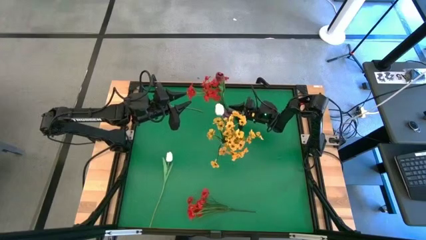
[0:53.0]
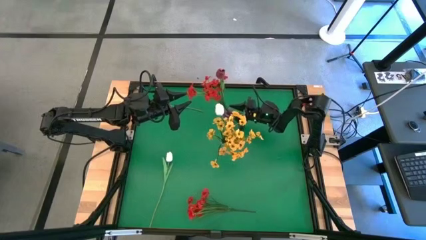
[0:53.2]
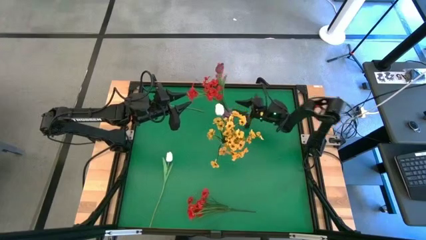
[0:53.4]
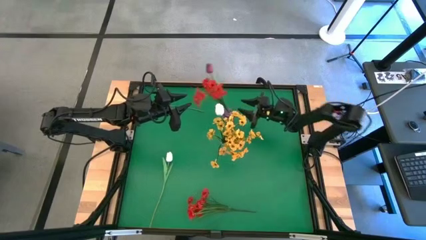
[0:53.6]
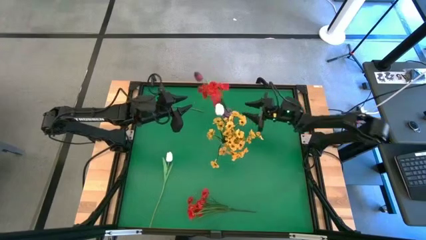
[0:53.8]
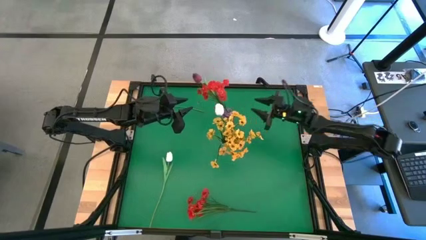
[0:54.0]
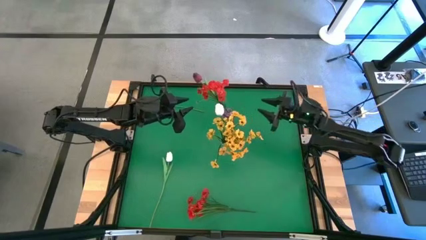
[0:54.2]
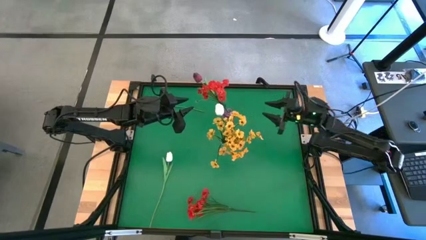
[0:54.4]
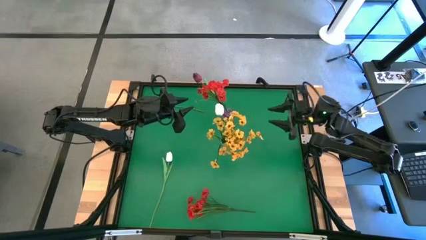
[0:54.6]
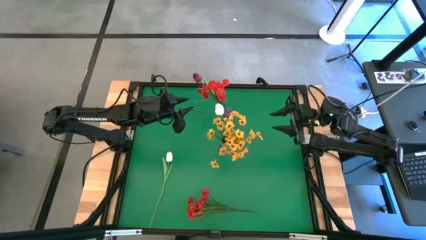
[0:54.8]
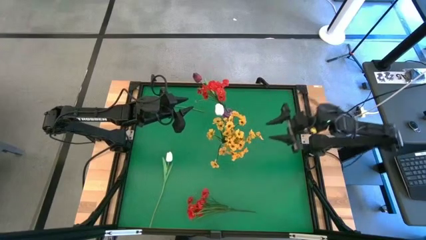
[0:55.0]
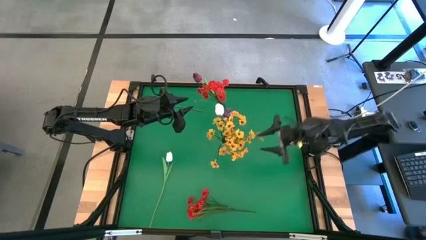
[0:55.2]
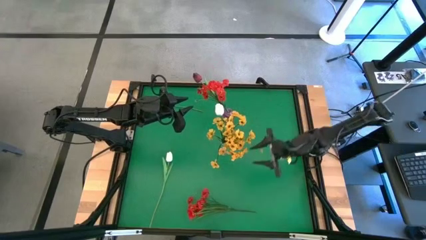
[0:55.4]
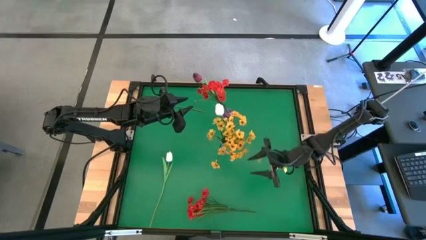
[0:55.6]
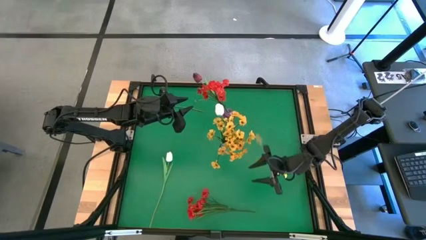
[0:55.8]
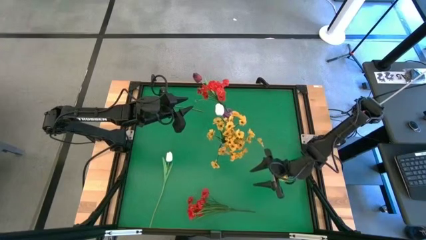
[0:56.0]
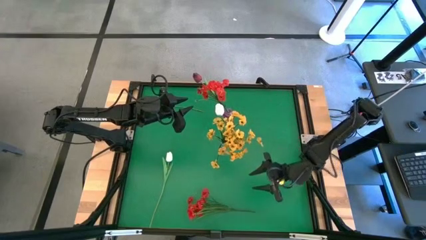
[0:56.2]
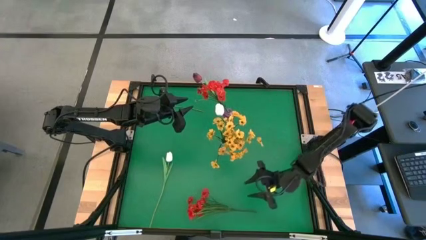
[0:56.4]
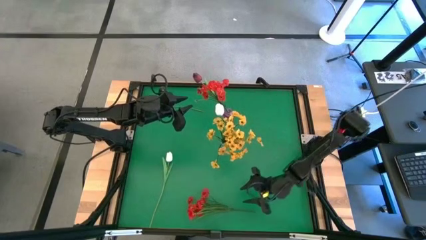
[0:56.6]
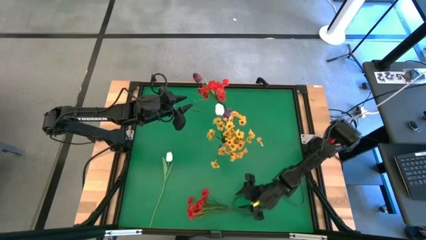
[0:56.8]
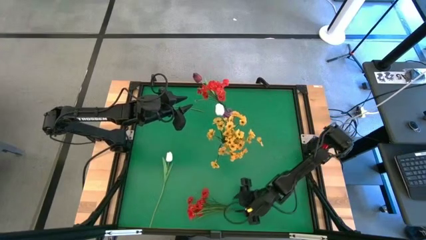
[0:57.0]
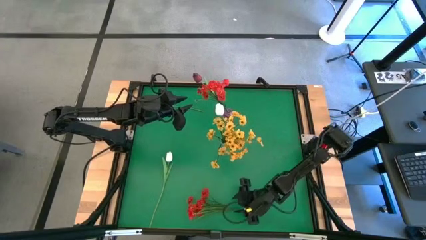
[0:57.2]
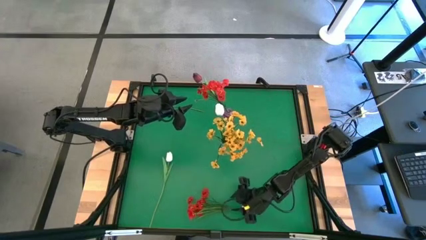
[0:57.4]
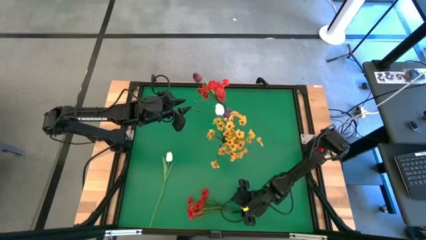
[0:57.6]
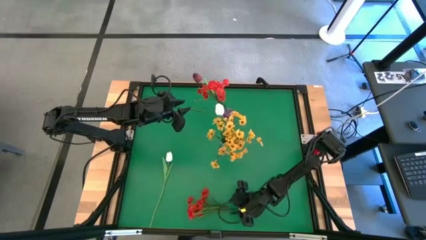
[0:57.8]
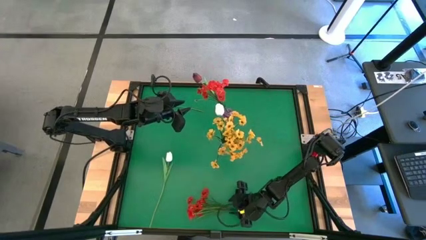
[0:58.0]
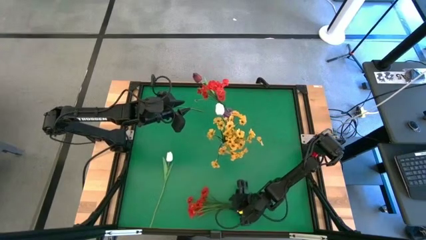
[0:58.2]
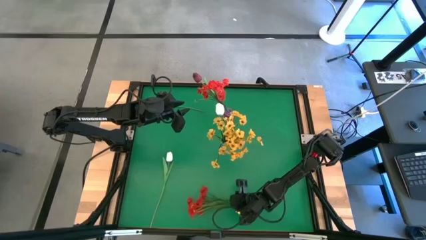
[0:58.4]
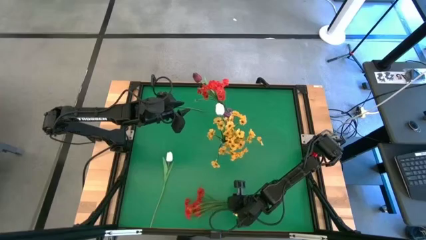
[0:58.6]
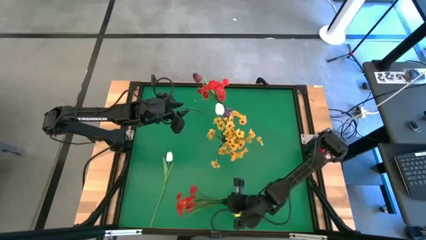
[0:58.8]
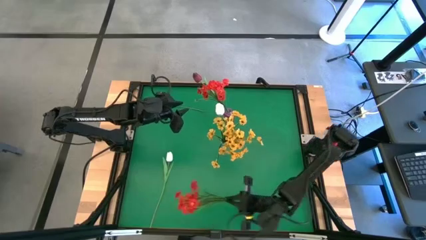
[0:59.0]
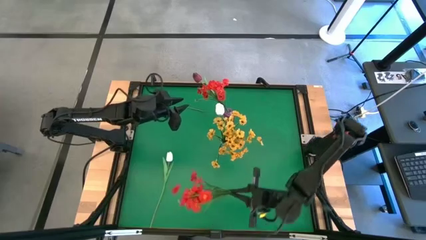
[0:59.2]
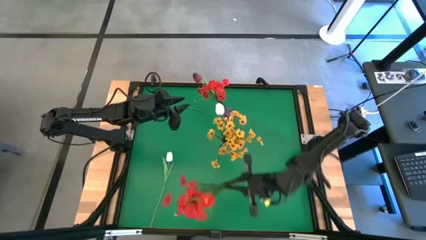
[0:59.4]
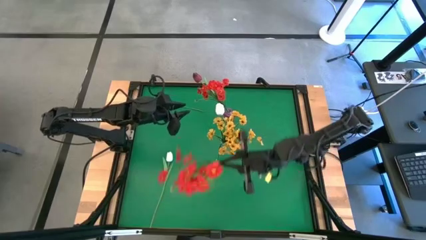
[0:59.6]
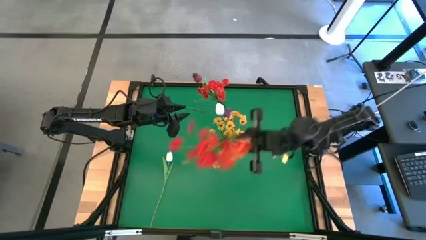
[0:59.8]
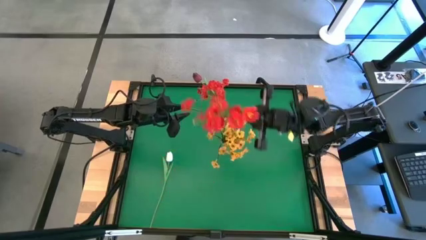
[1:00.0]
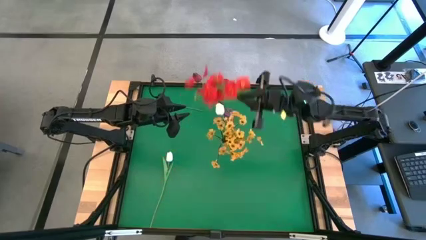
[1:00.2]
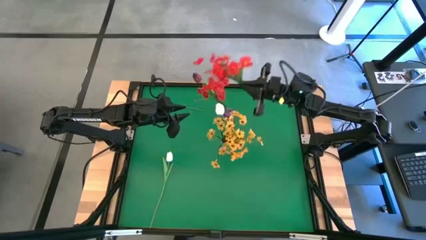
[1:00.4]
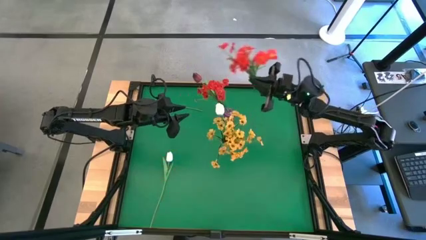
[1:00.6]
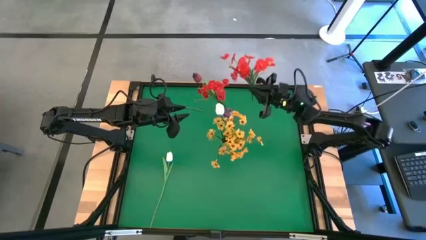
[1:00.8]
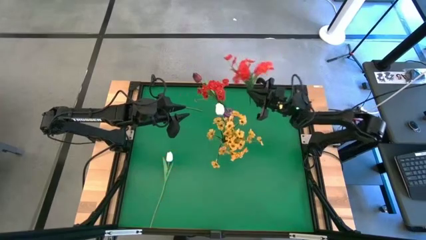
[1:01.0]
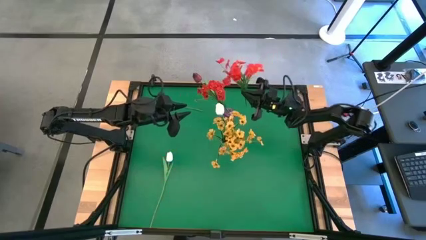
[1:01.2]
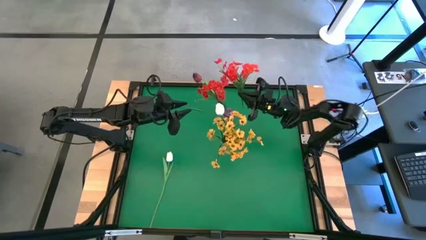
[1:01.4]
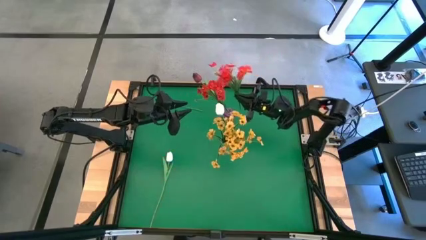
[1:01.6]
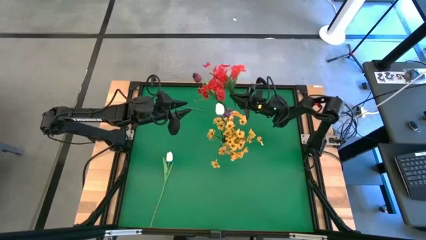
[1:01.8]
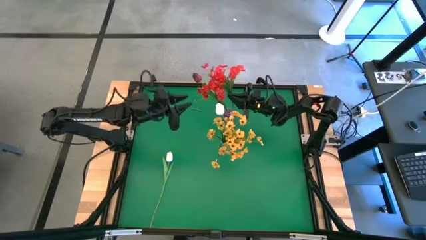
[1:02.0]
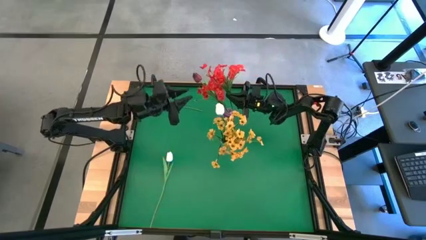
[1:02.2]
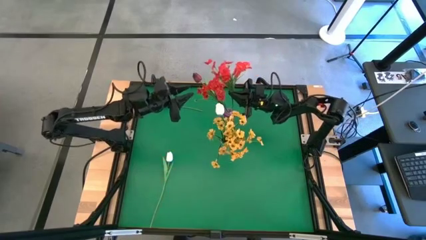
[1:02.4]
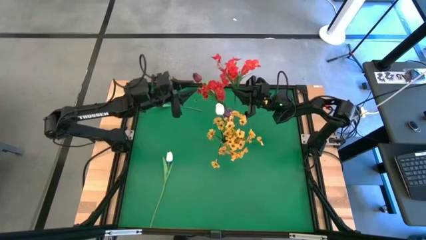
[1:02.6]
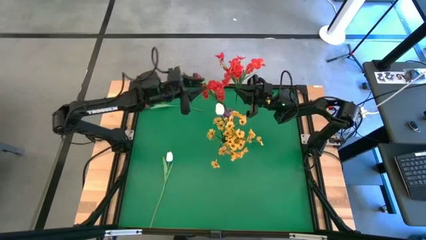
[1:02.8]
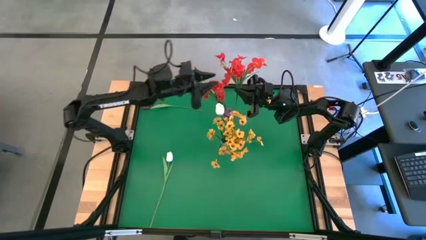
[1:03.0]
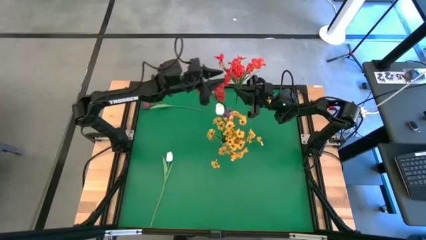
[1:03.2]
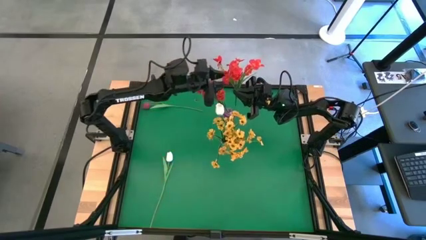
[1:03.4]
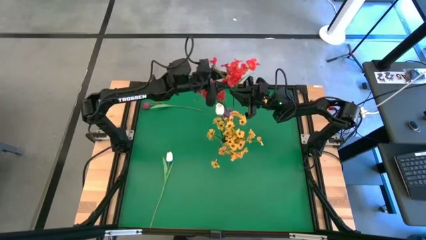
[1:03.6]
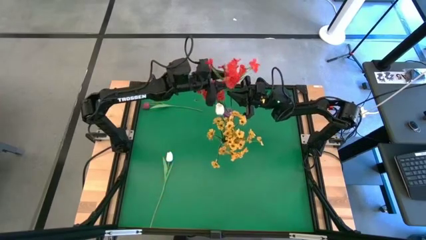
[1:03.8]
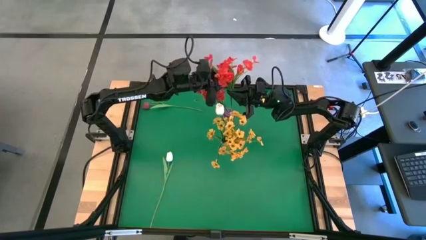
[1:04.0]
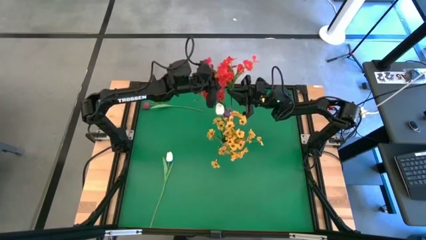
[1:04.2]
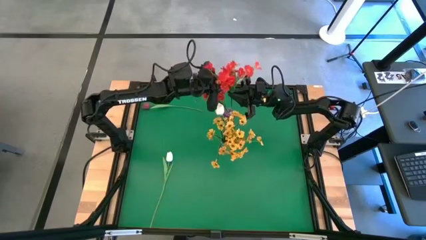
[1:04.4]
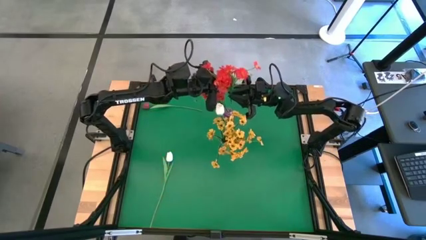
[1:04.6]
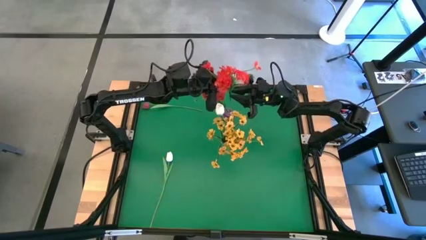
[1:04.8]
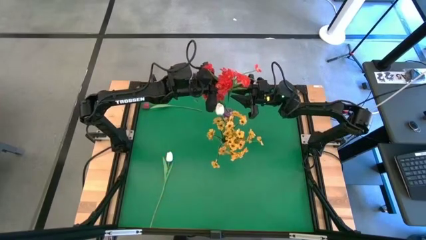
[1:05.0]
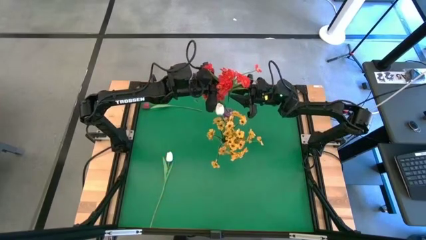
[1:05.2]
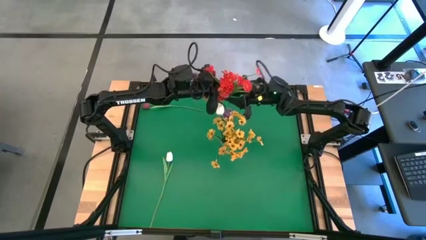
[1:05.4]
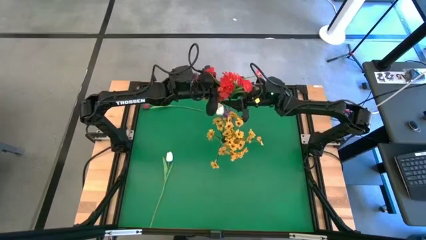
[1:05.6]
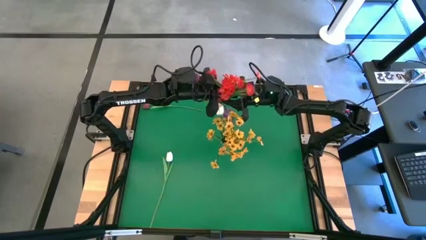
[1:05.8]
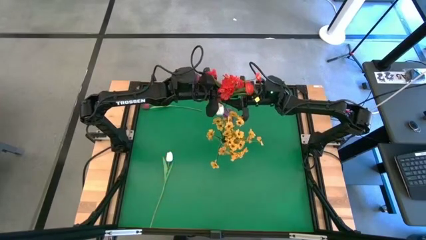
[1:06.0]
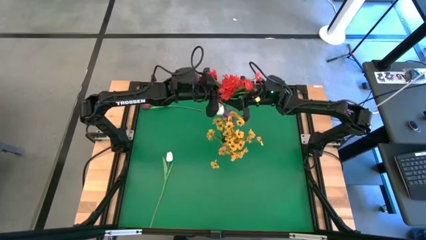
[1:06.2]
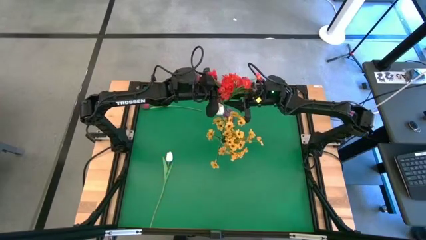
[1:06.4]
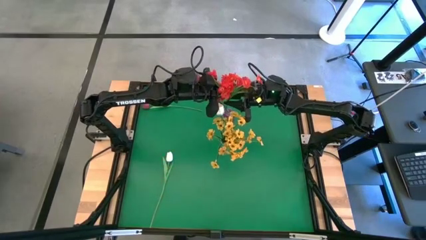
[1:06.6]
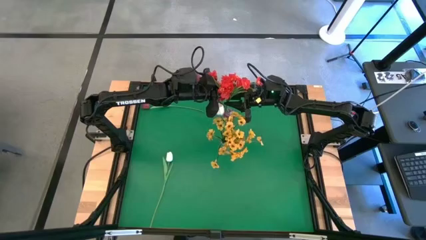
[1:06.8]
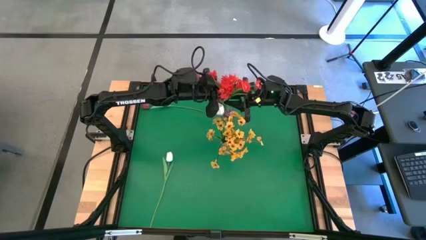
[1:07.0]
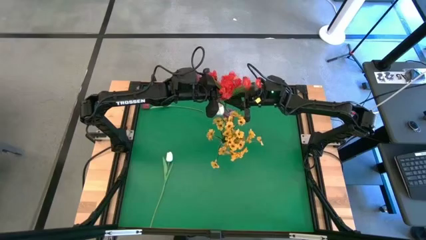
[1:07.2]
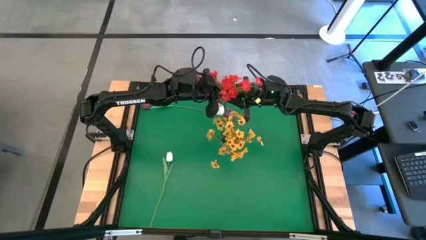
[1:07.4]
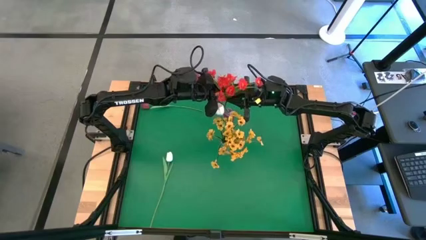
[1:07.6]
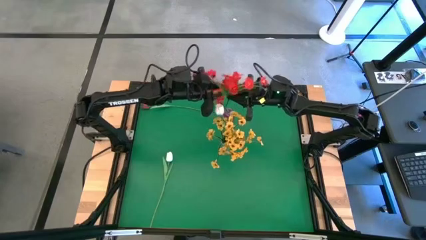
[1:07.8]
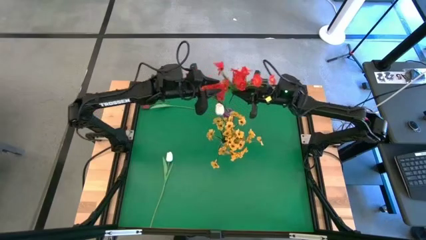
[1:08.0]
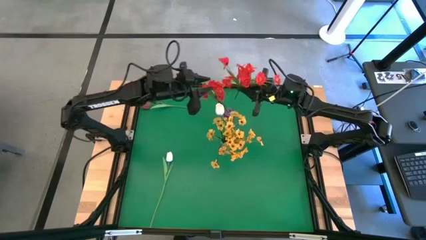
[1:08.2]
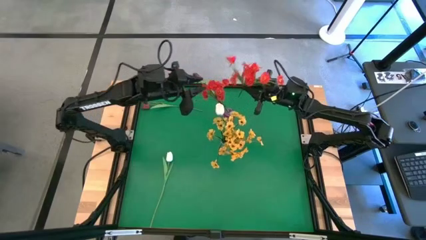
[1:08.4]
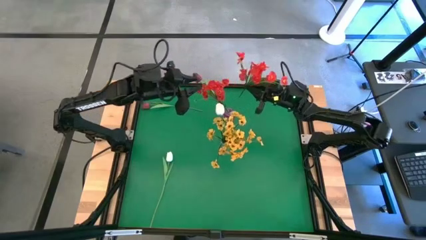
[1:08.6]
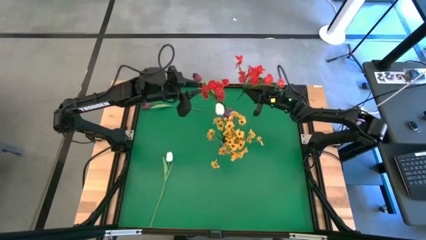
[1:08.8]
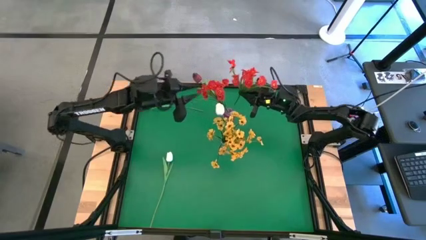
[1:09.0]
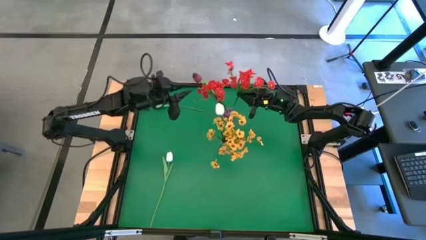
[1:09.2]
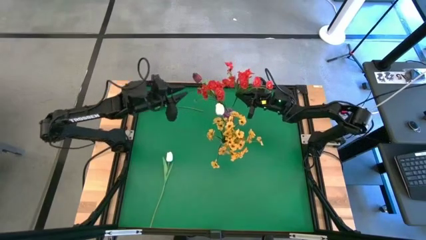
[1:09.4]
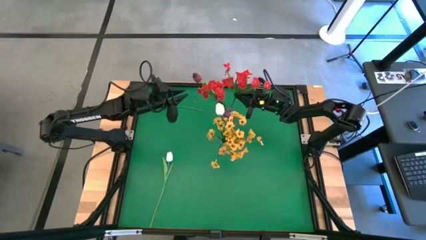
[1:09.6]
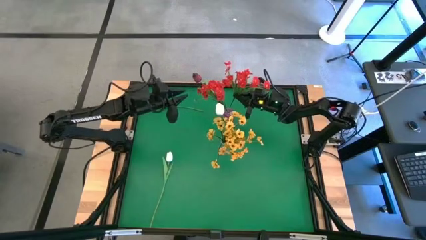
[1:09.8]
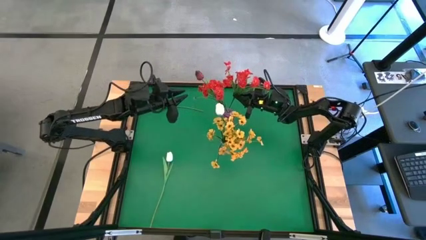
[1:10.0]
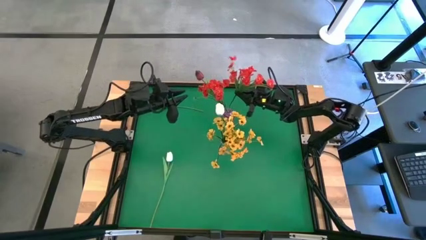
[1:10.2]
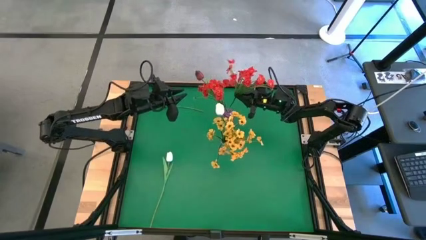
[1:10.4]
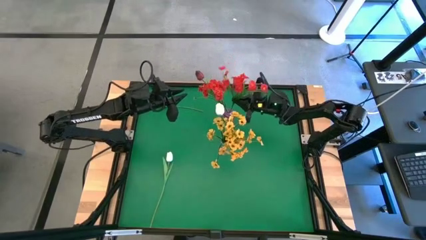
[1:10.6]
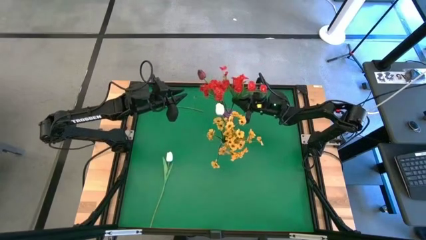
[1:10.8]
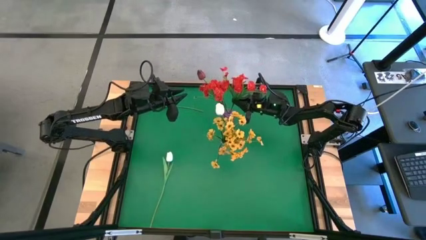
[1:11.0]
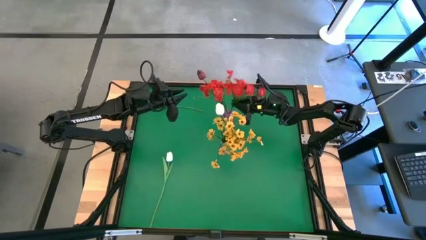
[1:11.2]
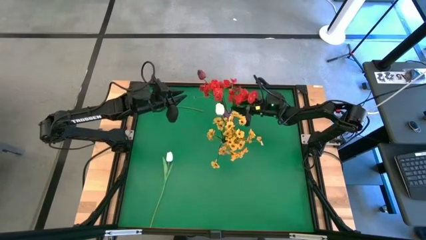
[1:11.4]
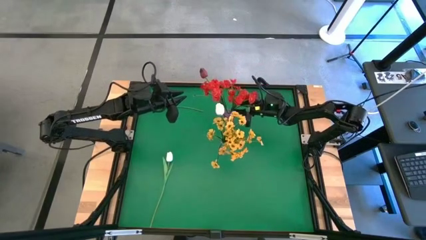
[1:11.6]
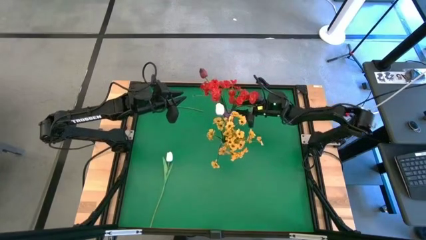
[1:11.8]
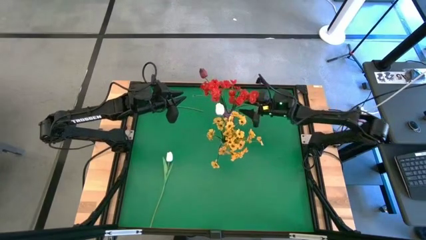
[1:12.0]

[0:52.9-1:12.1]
Task: Sort flowers into vase by color
Put the red flowers into the violet vase
